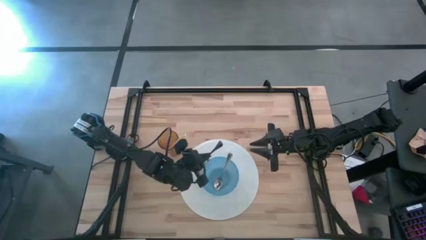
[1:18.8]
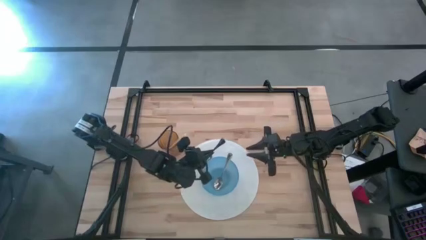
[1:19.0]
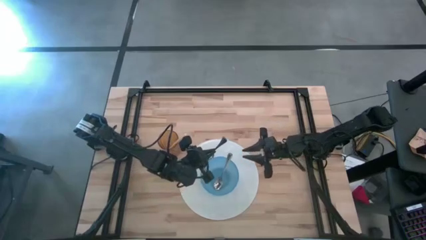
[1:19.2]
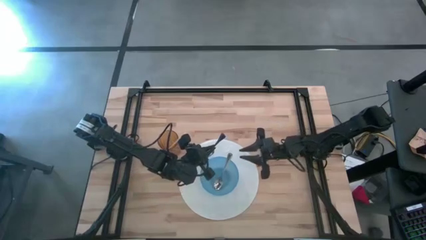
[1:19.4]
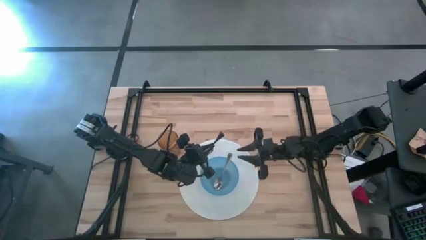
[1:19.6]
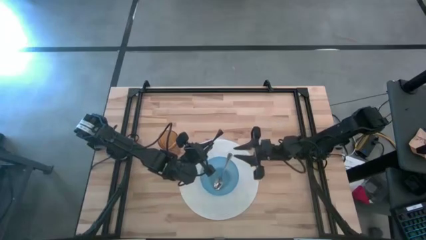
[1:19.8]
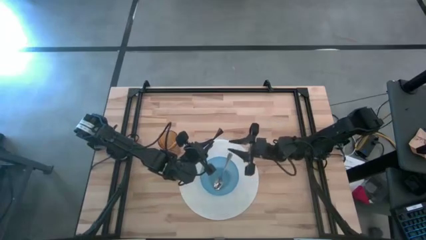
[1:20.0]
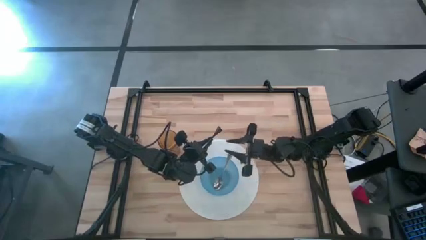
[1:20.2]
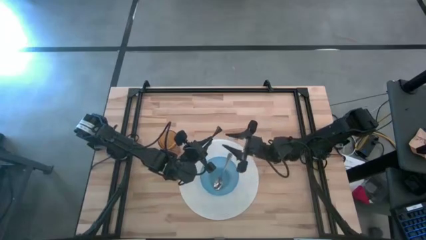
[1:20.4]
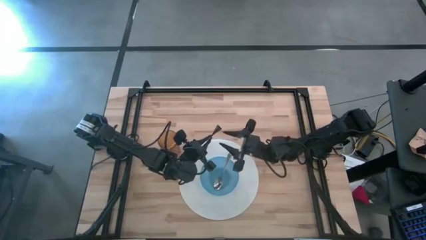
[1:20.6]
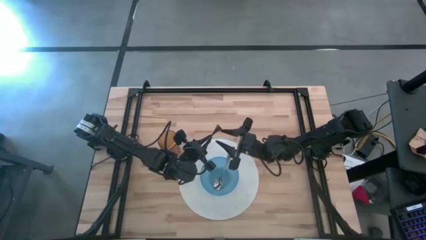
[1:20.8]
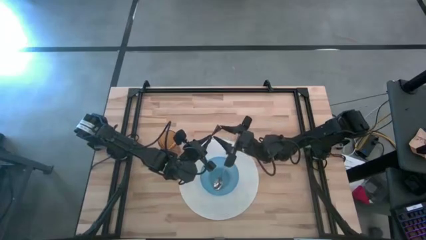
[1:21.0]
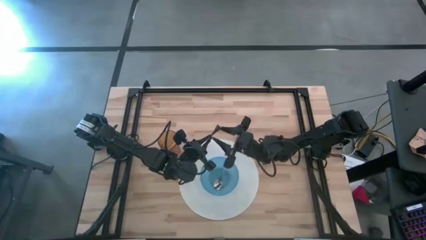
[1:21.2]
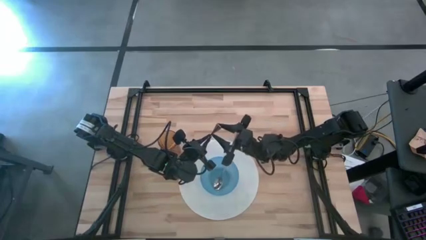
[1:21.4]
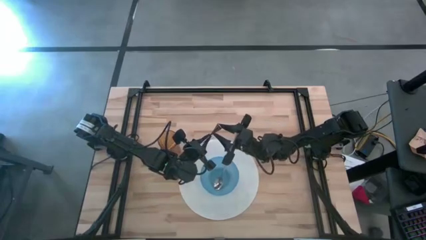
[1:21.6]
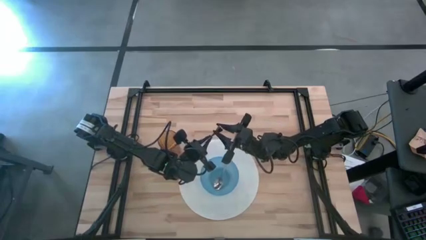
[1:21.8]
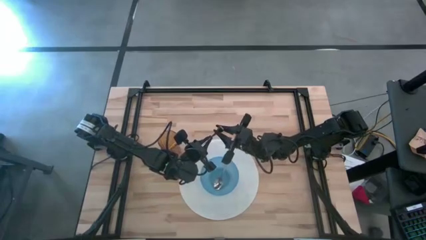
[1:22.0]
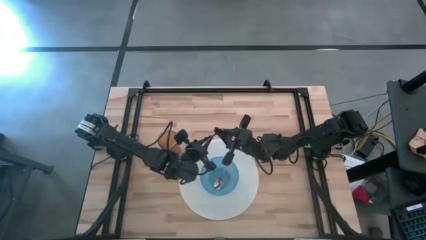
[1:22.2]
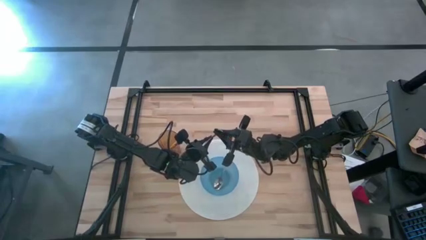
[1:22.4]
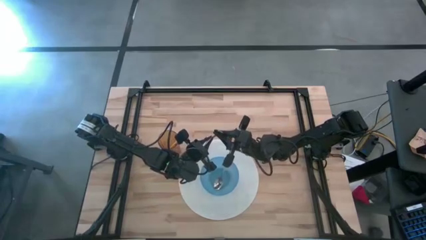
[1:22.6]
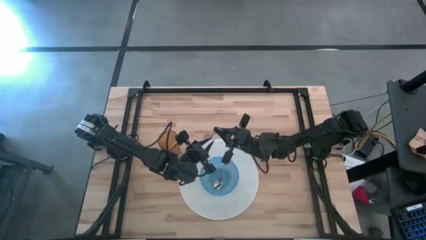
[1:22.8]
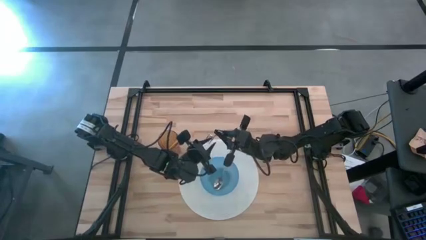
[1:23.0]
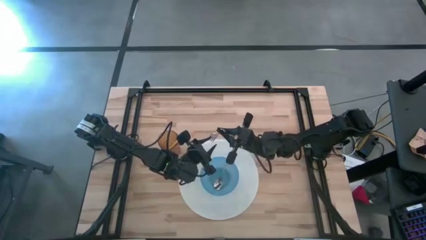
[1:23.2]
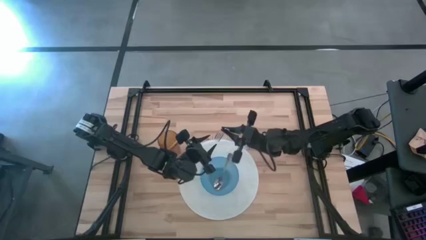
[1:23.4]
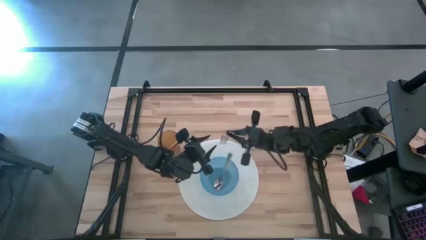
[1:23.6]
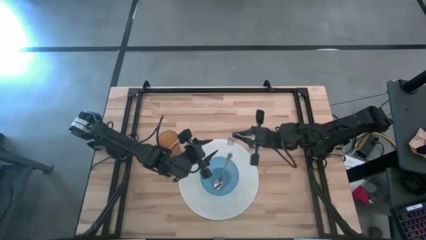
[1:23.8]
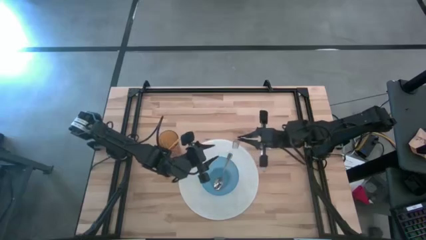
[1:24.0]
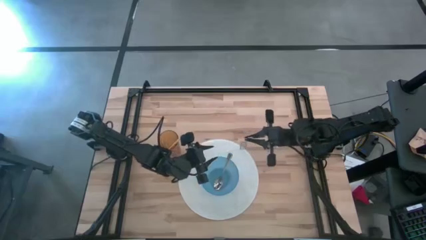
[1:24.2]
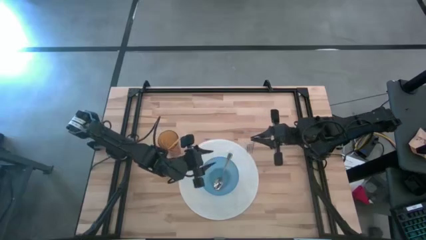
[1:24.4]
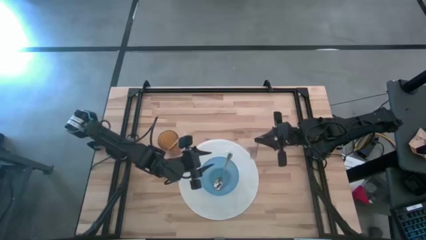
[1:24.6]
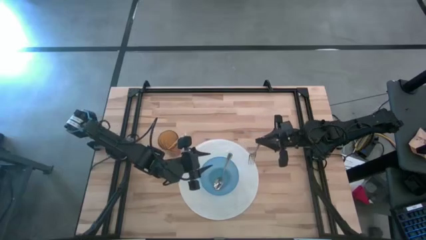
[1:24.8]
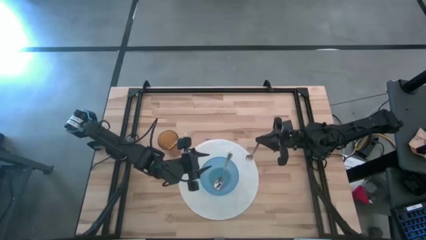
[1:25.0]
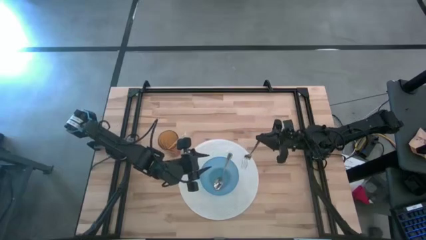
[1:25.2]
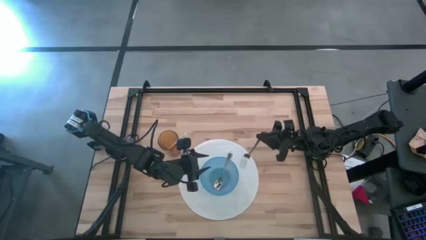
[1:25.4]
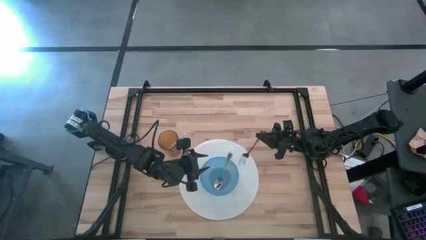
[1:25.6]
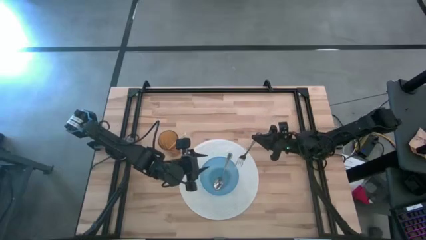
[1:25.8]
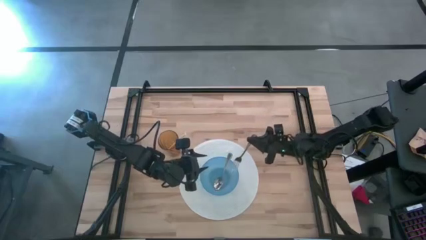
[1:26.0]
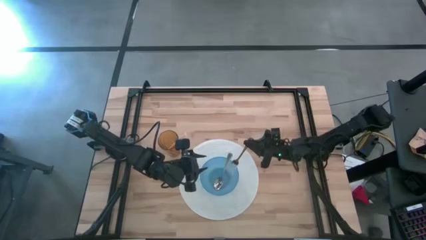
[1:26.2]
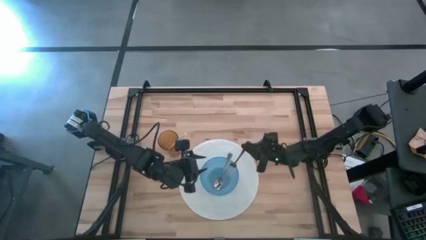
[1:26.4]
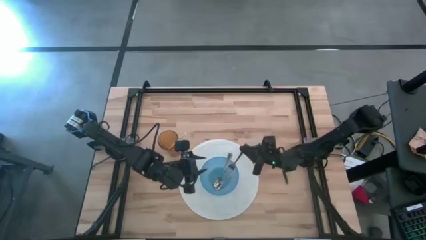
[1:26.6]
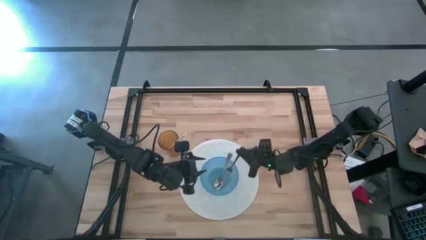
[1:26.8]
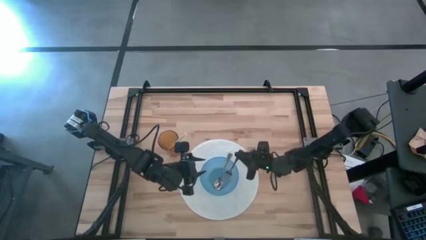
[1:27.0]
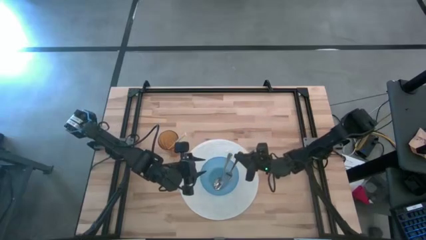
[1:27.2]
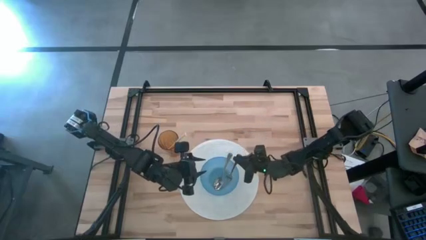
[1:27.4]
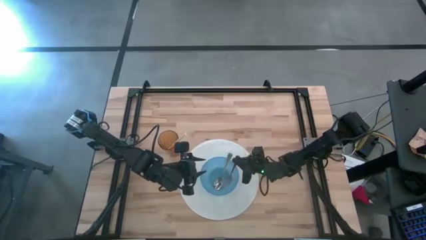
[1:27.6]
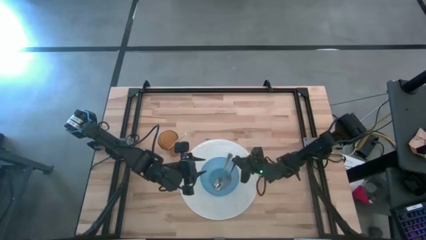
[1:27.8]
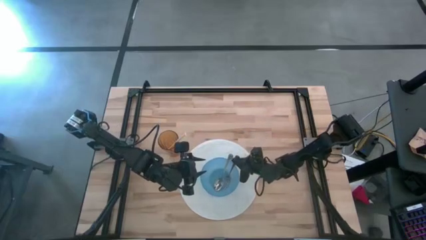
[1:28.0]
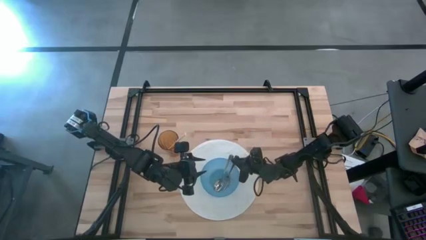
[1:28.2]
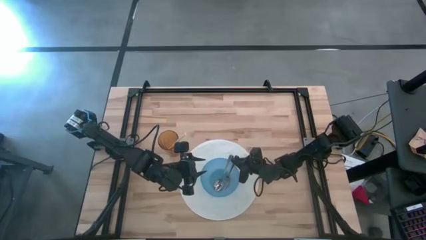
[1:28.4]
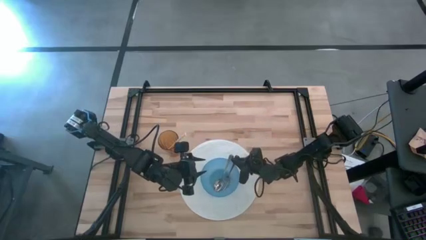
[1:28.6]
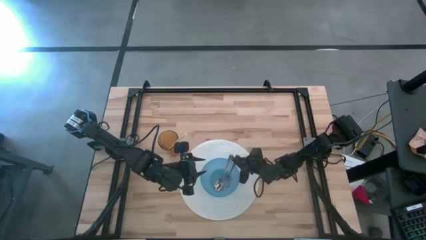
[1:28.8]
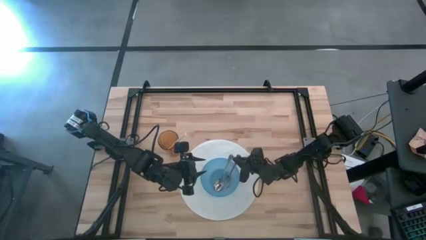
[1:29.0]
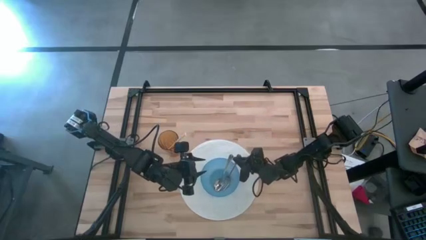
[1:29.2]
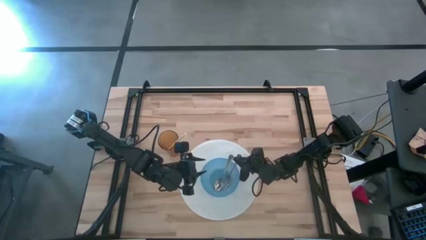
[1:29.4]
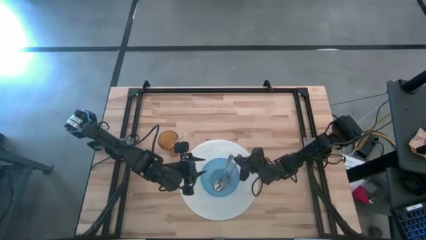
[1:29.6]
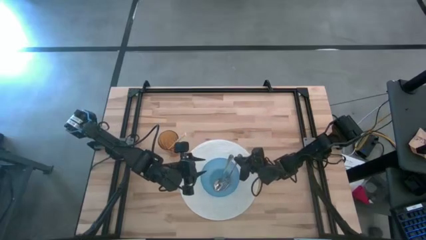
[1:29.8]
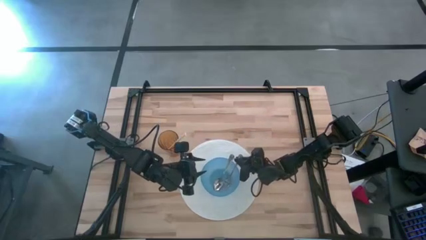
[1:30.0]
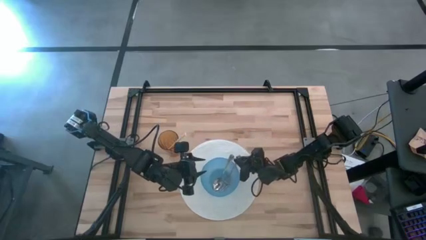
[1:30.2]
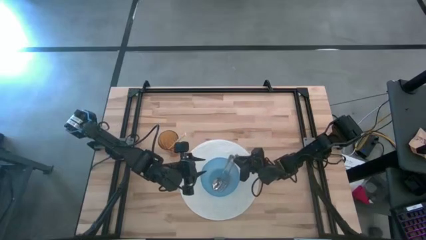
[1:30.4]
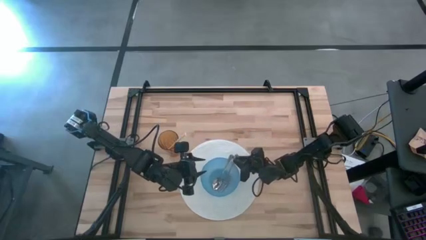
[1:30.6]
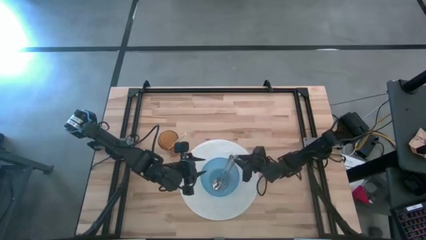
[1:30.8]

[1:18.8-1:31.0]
Task: Pick & Place Utensil
Put the fork into the blue bowl
